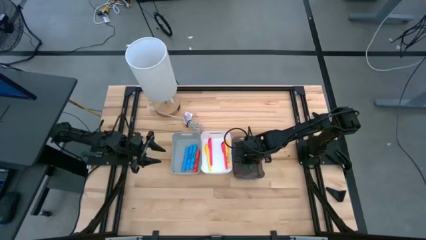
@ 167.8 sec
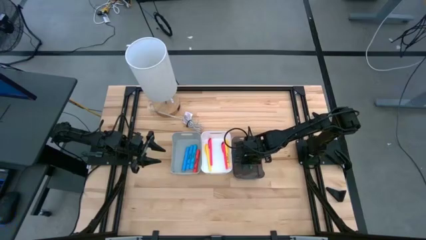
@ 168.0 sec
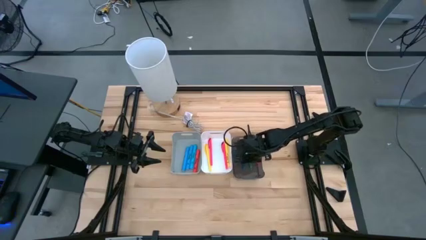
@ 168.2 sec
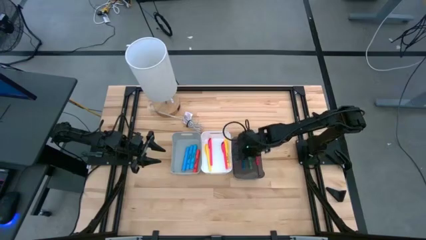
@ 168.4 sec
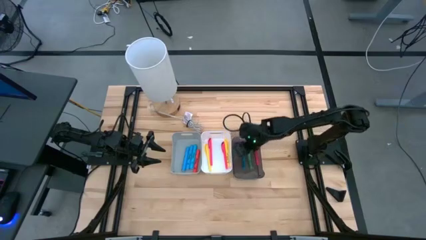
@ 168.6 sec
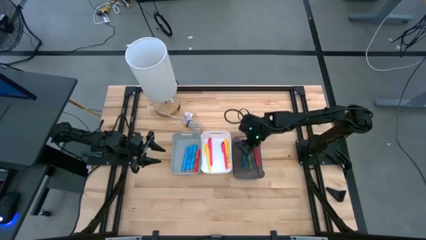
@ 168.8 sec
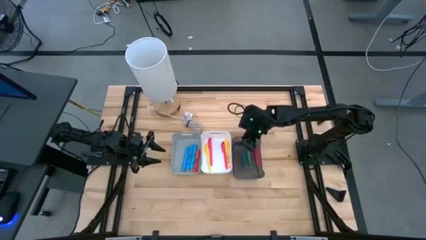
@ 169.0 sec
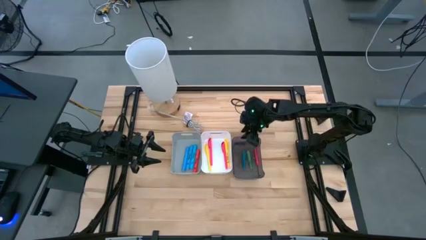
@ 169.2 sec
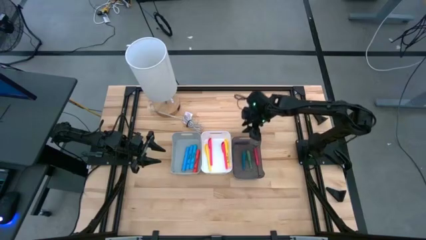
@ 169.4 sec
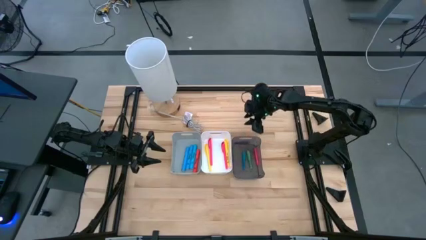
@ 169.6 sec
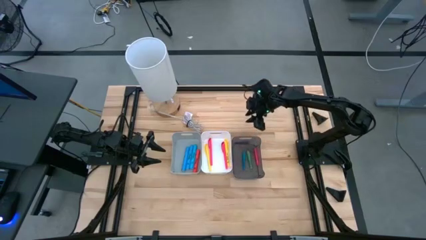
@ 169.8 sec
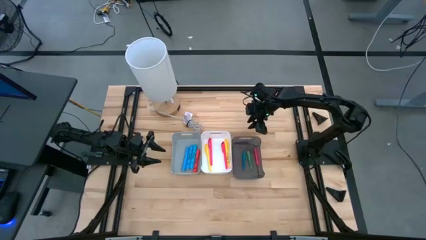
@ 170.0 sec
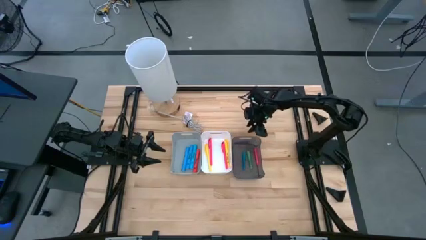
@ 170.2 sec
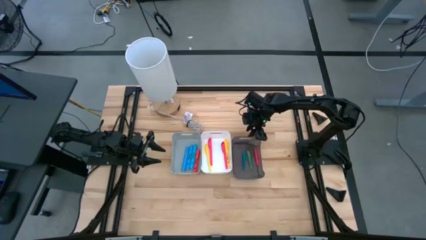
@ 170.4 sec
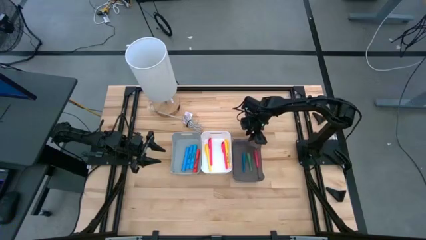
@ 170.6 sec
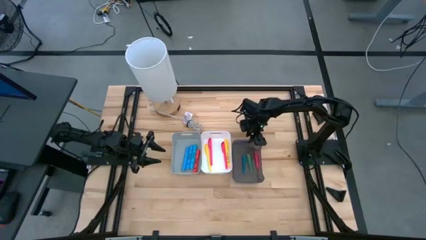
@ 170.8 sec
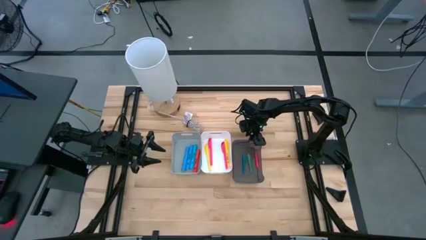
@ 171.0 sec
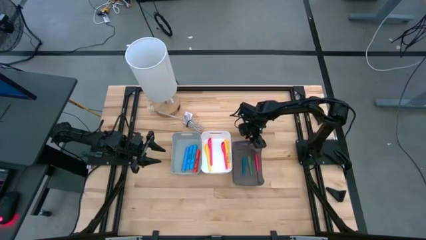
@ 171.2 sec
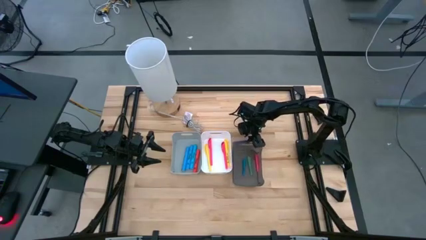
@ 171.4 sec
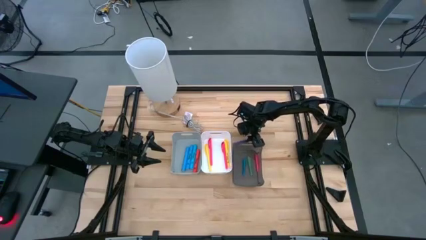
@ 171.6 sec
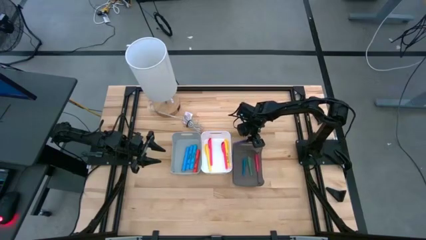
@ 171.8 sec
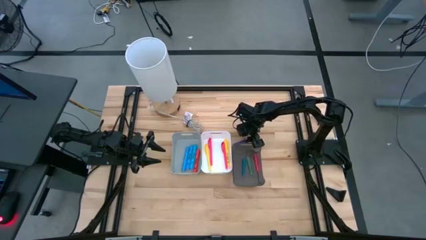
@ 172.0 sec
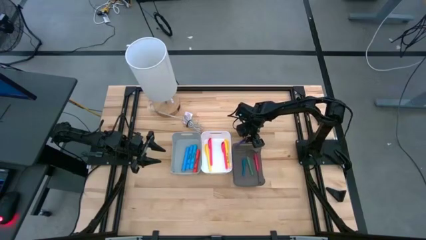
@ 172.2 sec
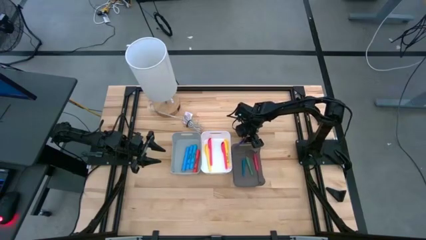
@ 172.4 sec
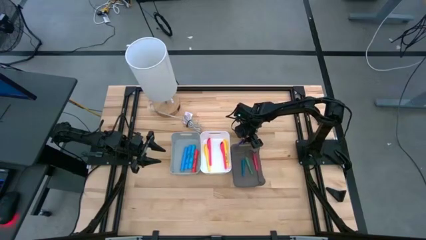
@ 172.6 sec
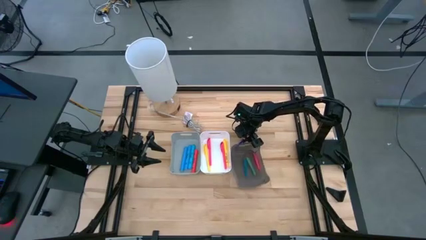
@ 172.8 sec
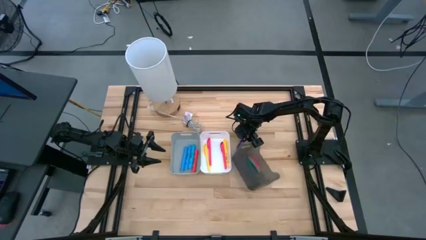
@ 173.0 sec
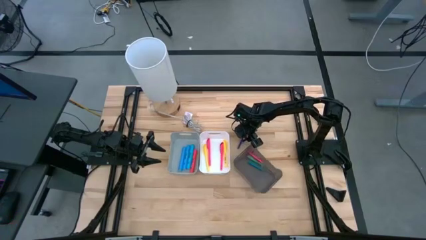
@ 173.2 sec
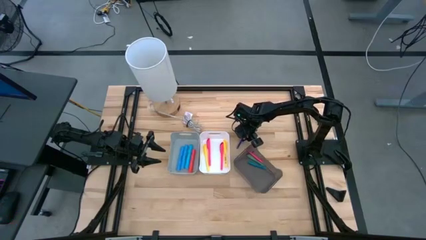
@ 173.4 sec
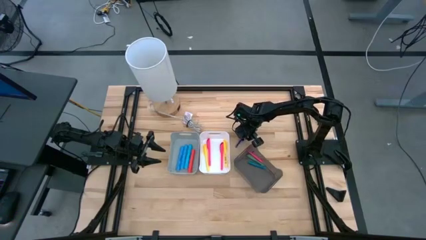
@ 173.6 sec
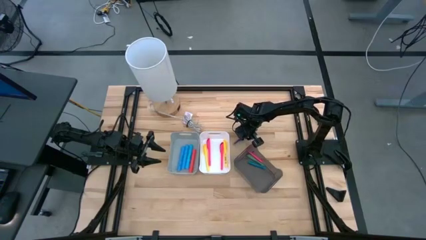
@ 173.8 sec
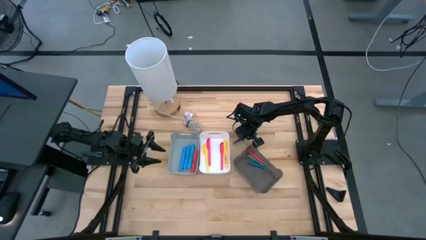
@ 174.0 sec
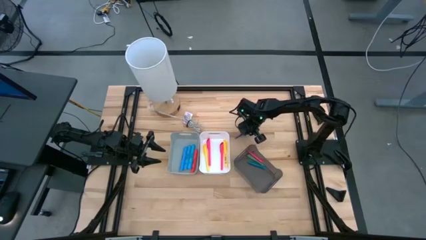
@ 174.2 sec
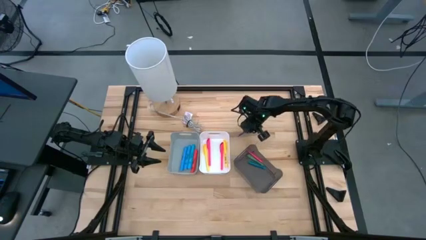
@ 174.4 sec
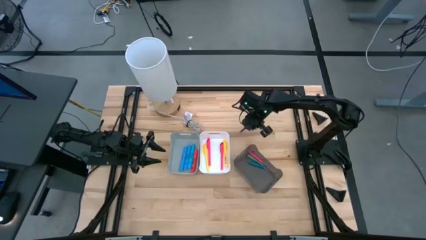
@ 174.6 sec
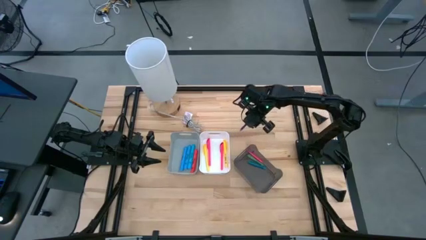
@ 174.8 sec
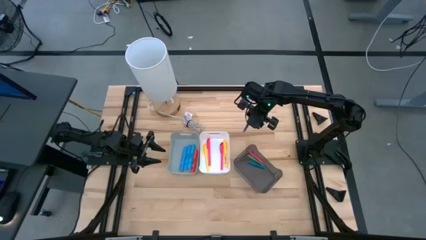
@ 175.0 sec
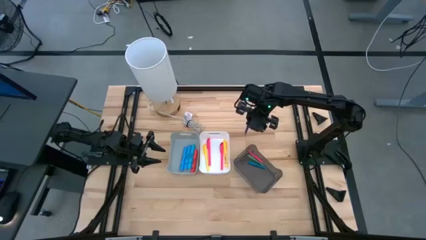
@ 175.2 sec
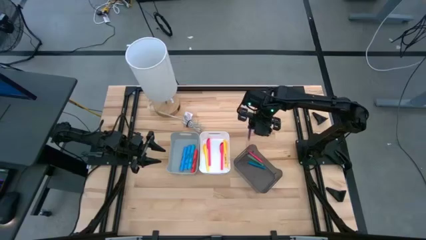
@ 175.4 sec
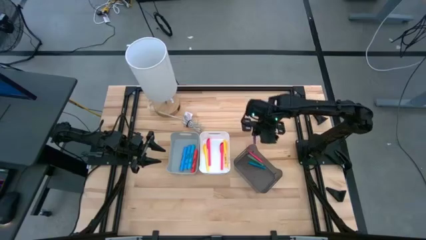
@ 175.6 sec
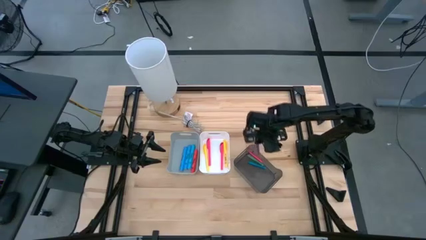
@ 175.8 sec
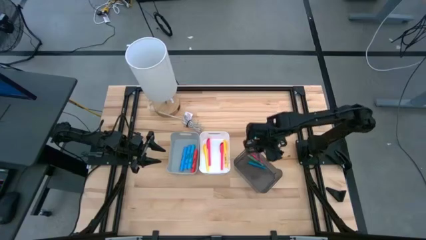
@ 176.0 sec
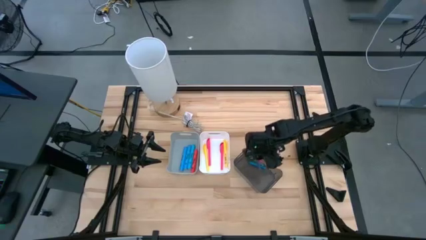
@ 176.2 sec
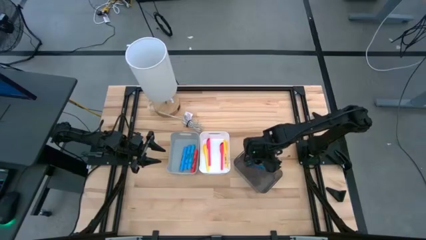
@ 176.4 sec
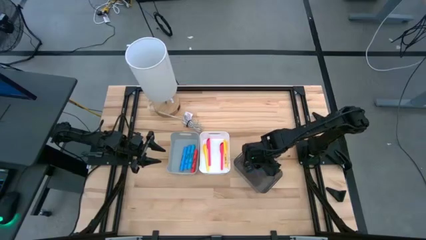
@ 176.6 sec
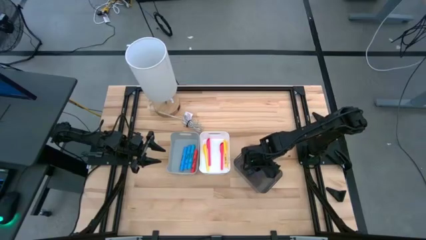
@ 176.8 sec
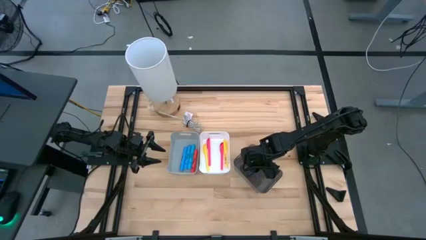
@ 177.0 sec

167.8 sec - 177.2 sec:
Task: Pick & Place Markers
Put the purple pen into the black bin

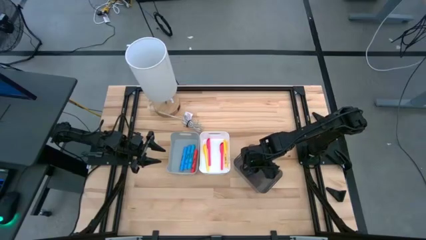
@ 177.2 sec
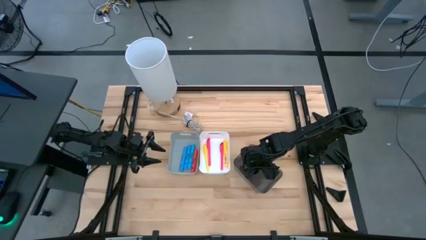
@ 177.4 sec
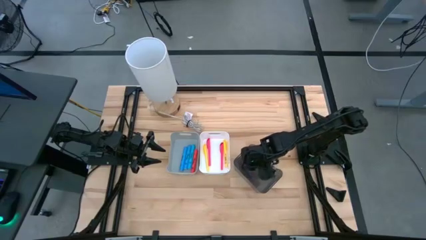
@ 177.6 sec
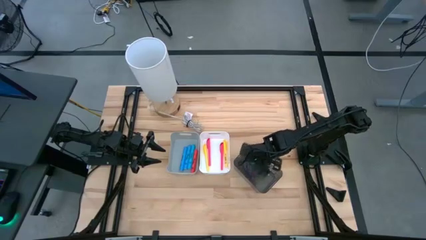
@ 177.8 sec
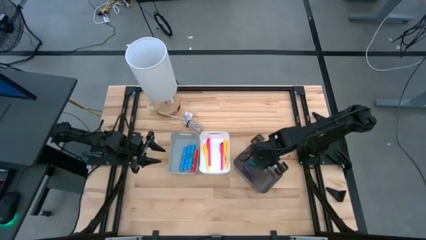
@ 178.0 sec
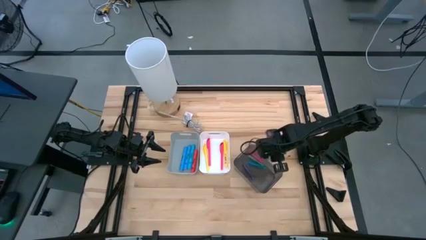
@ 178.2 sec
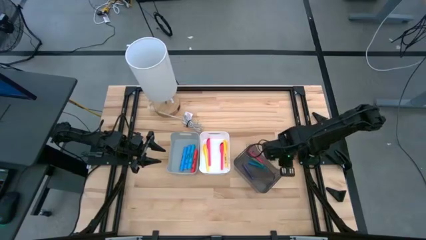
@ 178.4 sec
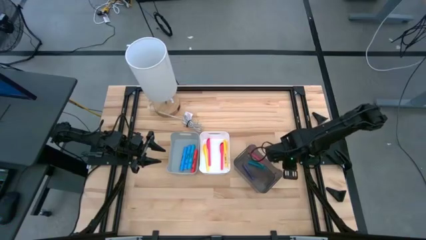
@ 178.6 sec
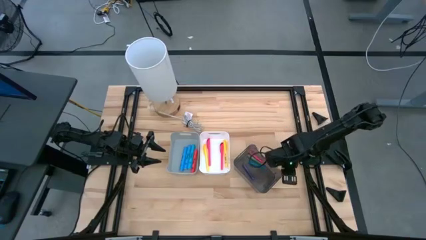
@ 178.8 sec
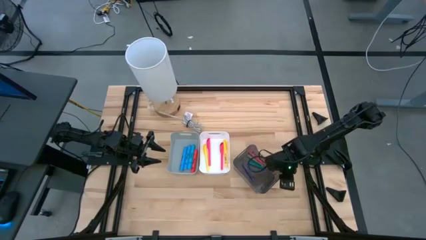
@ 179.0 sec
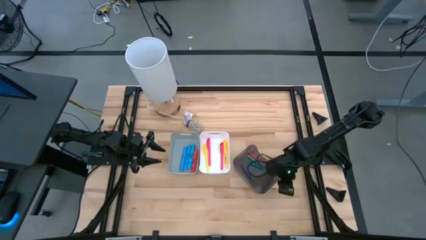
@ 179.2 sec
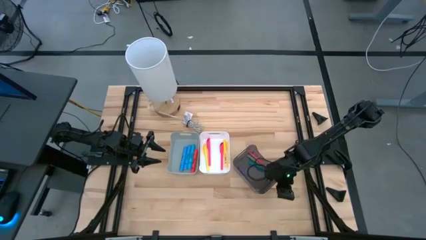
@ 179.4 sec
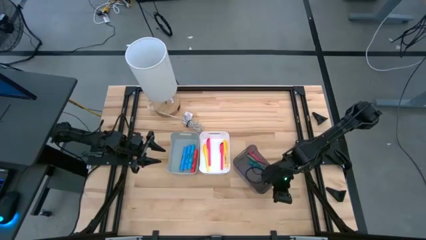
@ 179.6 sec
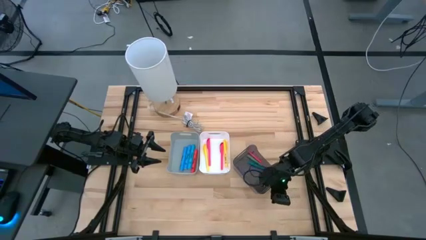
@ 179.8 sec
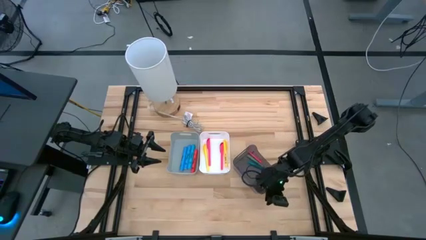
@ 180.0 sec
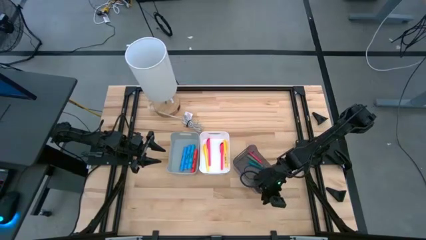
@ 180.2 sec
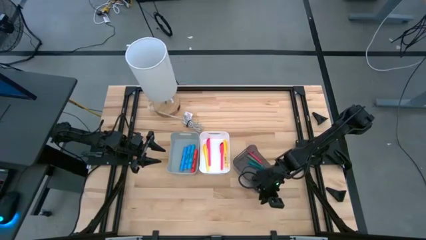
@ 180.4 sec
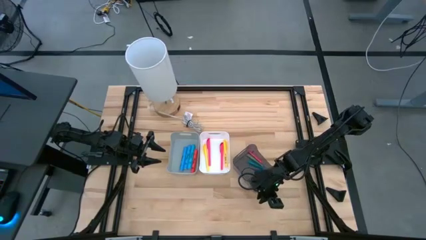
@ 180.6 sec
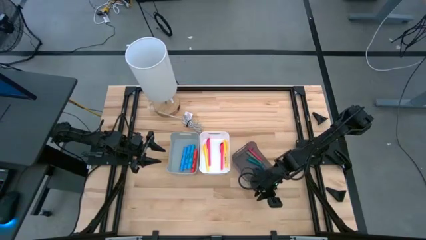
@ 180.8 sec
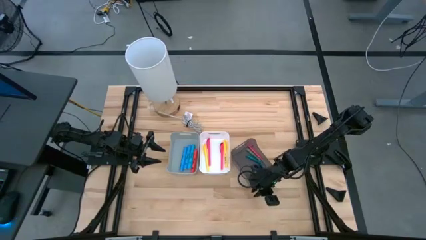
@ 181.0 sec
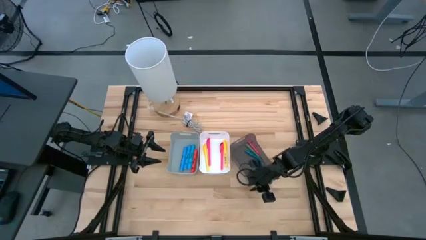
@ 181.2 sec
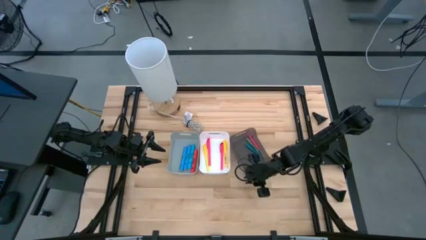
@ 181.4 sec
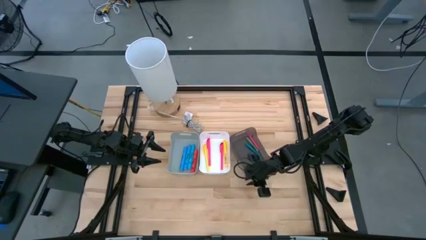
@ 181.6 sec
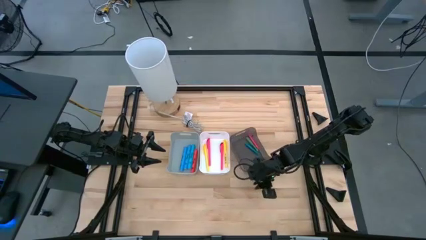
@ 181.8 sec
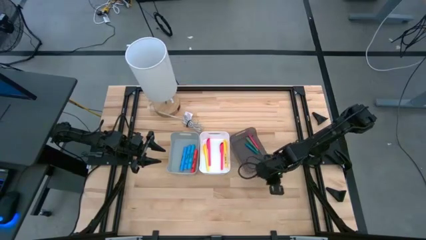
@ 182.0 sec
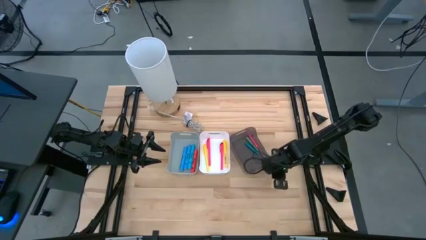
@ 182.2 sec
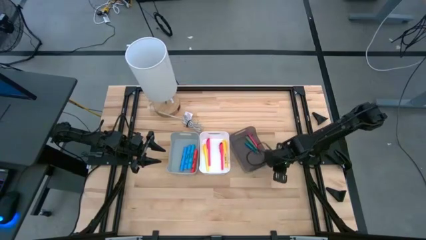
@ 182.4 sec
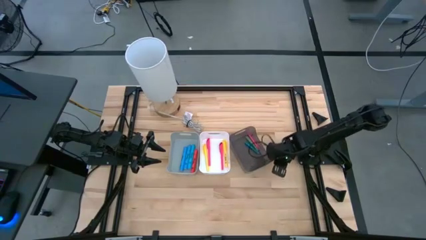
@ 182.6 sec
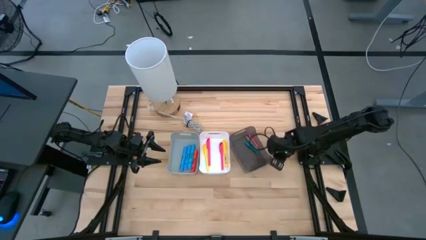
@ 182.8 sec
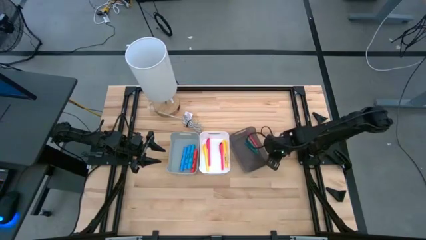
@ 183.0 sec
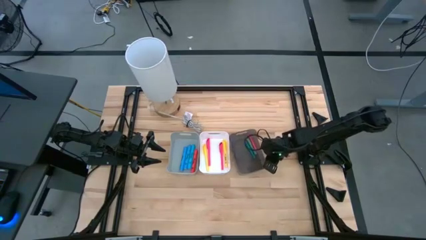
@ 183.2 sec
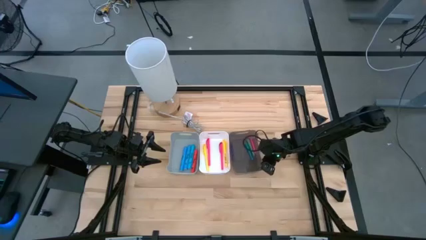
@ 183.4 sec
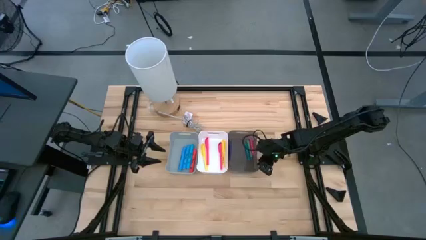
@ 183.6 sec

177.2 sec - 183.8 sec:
Adjust the black bin
